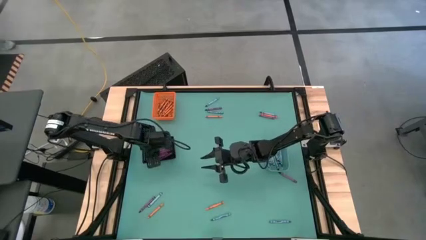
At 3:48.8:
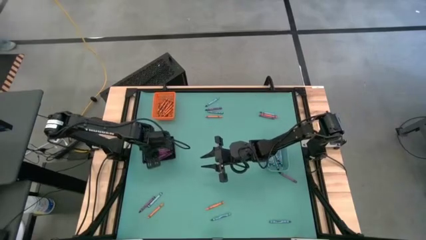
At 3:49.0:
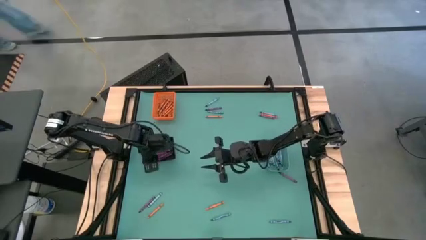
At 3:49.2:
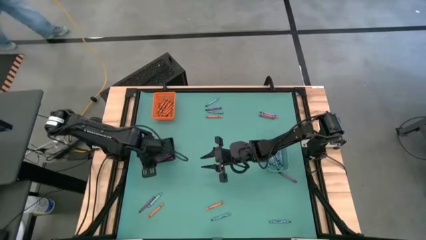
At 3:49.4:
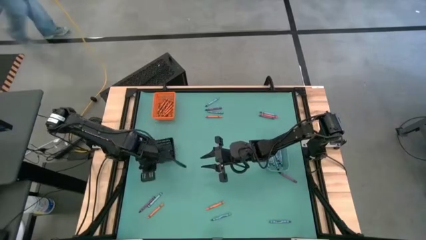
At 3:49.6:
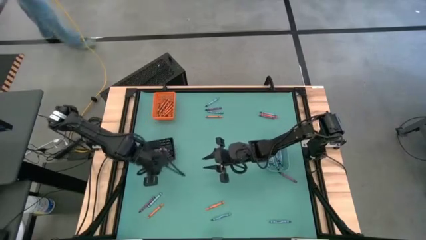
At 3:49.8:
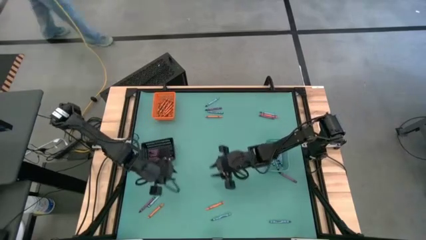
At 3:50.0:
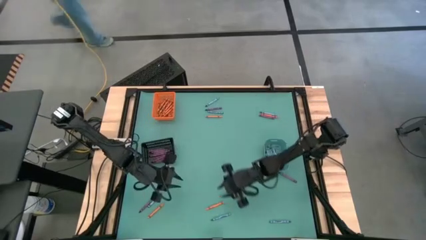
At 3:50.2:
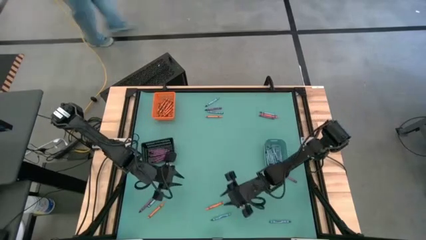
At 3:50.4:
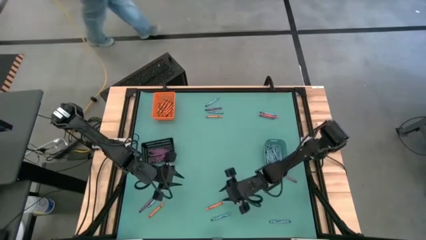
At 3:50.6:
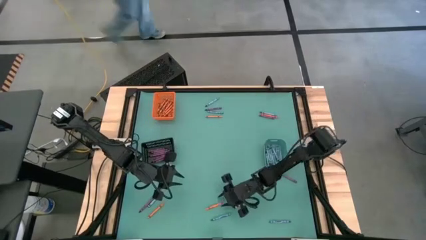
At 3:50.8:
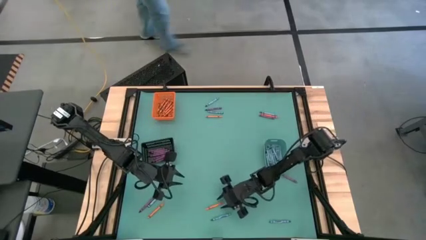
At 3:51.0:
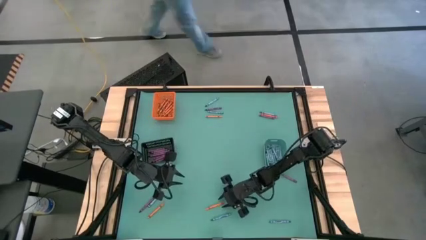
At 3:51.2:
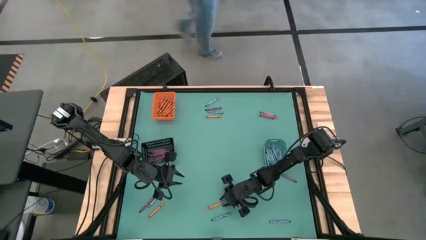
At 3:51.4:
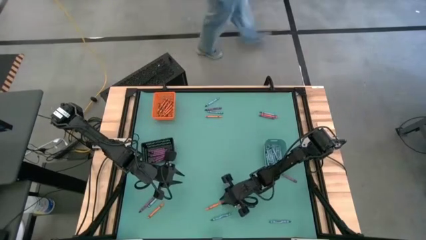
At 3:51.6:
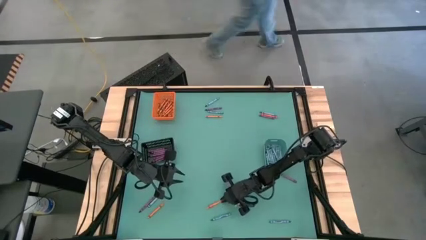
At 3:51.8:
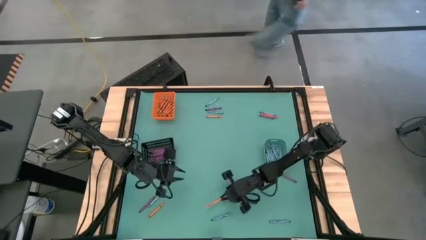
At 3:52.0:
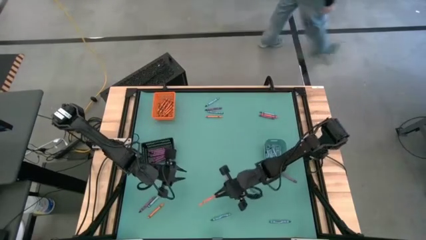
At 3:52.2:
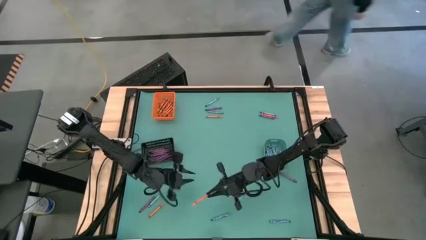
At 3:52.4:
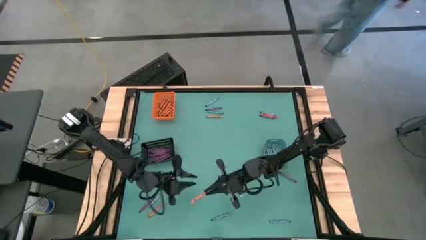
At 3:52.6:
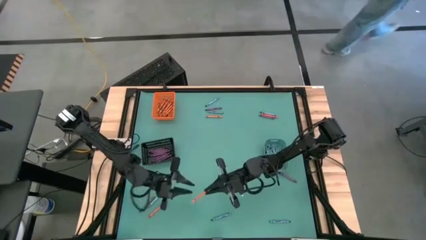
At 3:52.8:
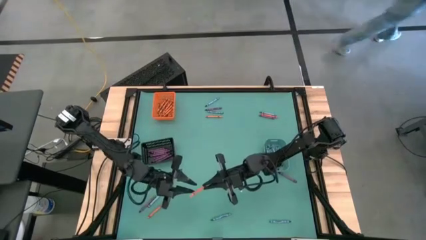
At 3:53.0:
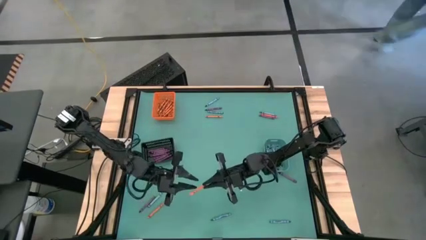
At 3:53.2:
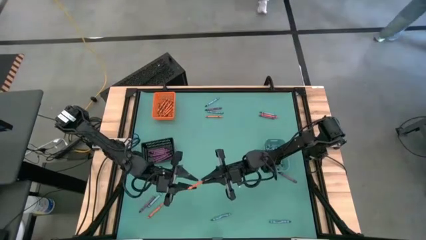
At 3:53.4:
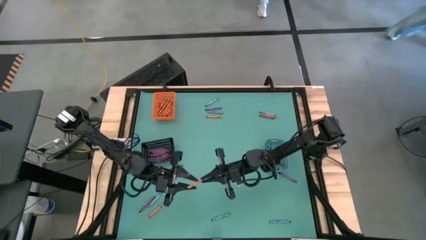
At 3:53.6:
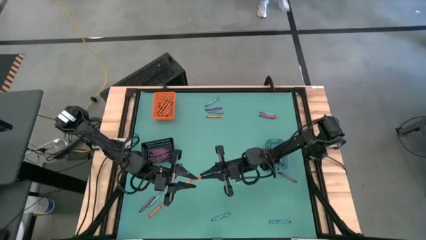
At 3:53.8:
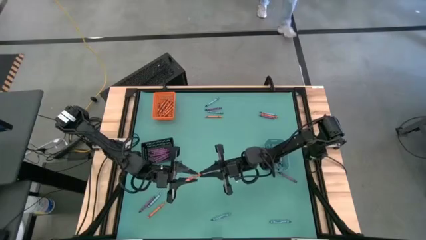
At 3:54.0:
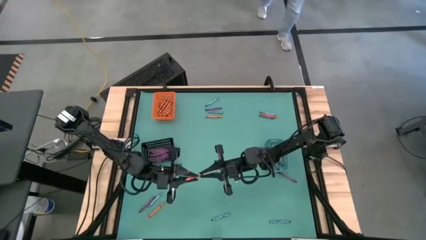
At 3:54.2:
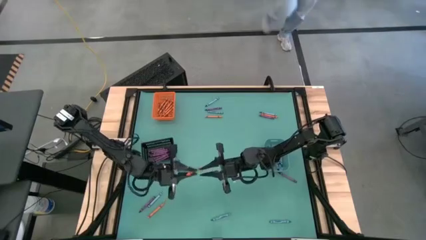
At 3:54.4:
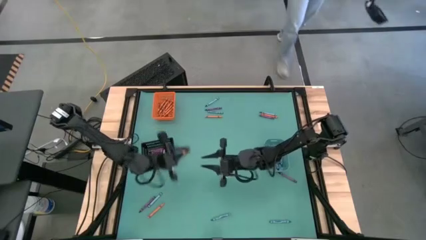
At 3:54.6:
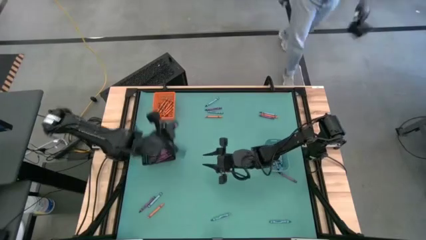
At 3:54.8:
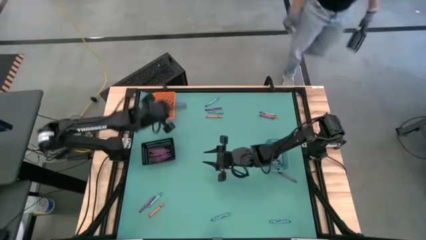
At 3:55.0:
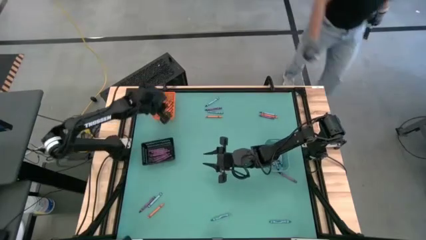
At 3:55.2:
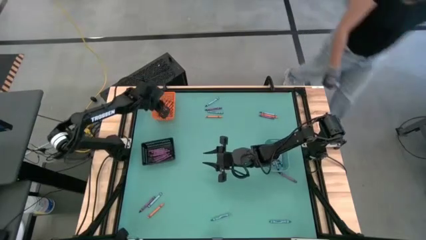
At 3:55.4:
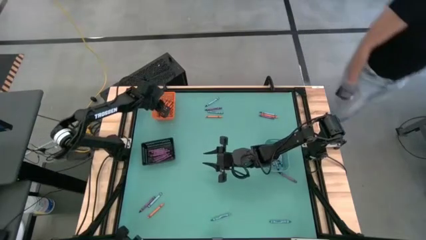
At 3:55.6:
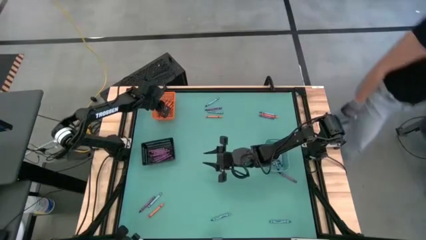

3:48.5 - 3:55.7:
Task: Sort crayons
Put the orange crayon into the orange bin

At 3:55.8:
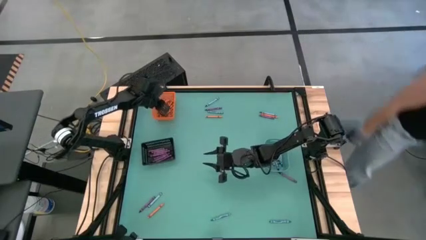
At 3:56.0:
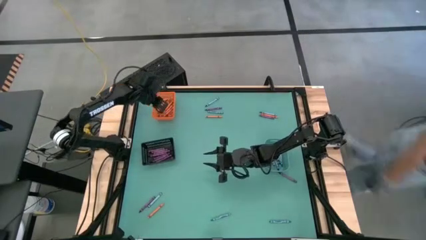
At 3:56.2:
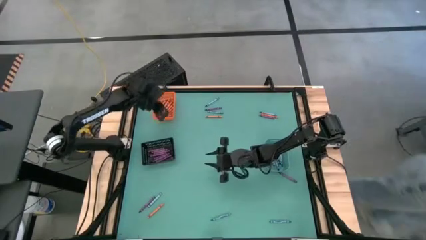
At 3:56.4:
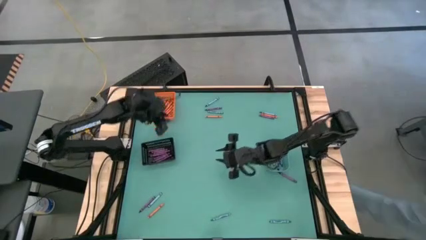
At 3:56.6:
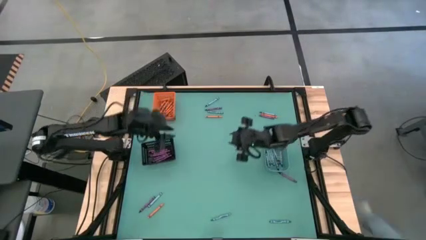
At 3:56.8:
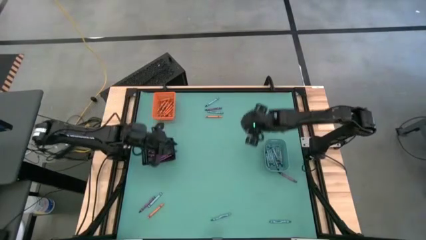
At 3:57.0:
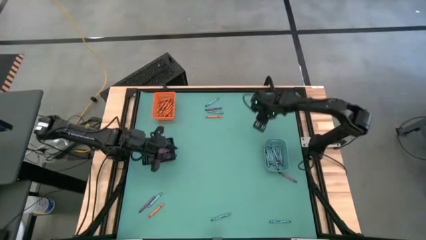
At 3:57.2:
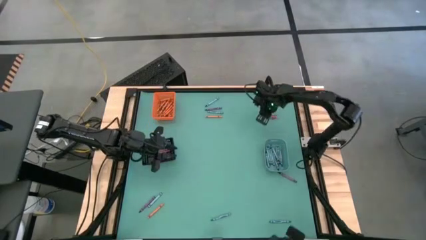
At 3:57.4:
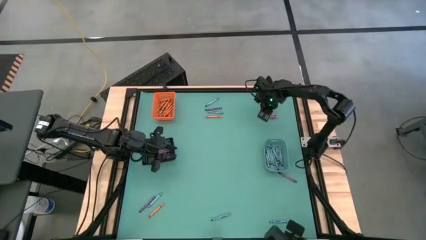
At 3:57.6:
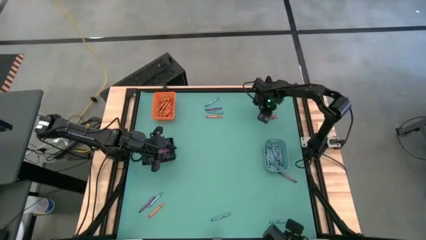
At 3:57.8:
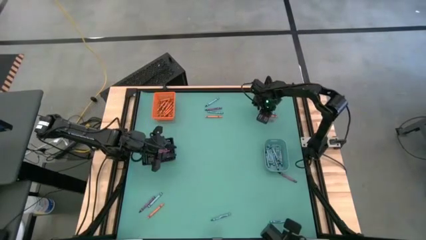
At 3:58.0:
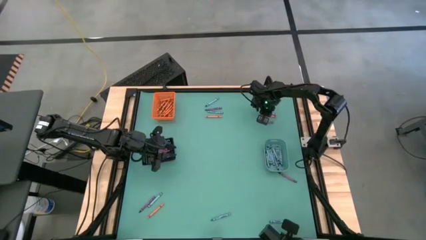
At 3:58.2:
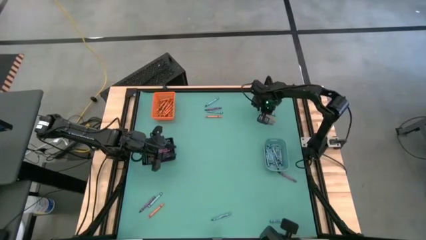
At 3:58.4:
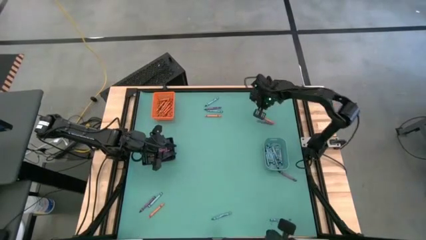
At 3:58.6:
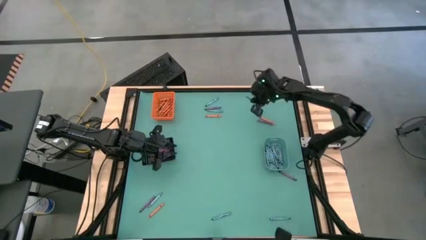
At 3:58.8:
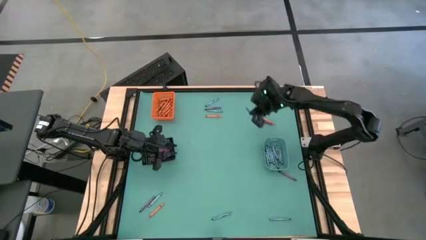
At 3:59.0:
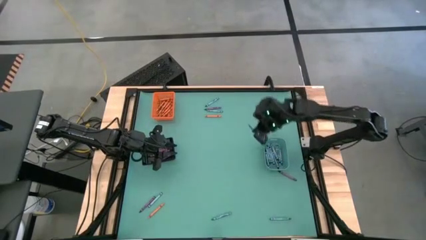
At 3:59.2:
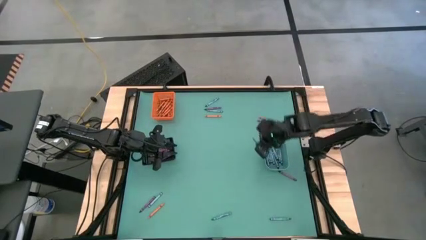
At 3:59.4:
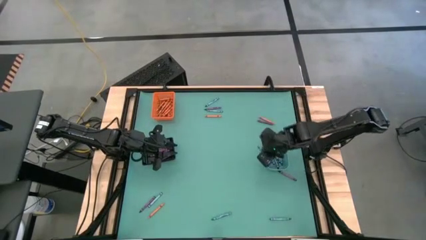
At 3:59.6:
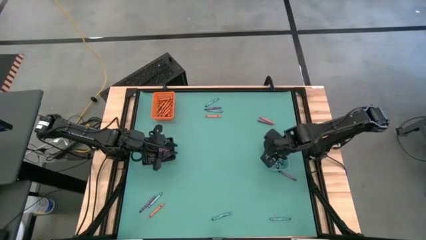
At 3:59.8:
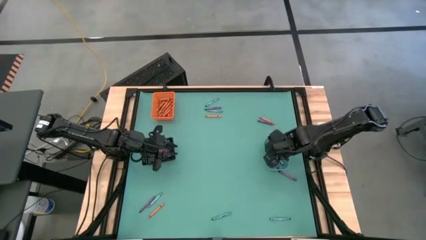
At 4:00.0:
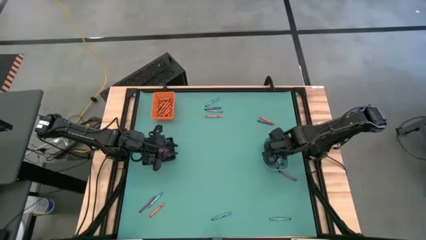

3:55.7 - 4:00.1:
Put the light blue crayon into the blue bin

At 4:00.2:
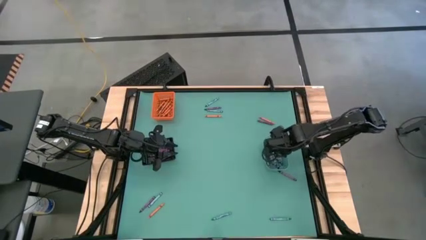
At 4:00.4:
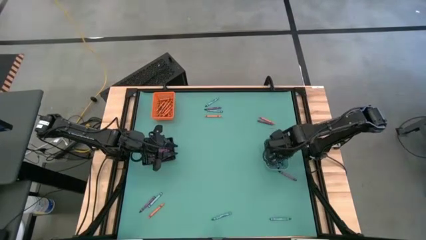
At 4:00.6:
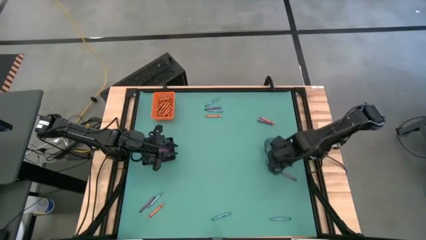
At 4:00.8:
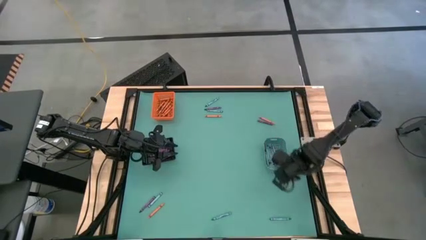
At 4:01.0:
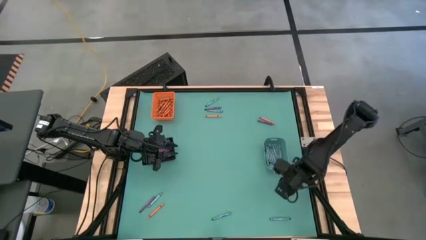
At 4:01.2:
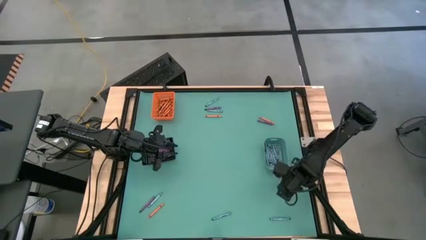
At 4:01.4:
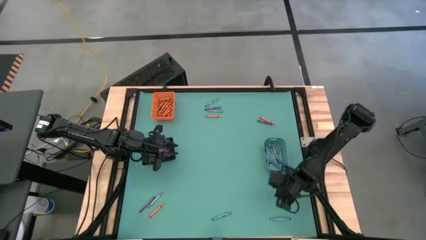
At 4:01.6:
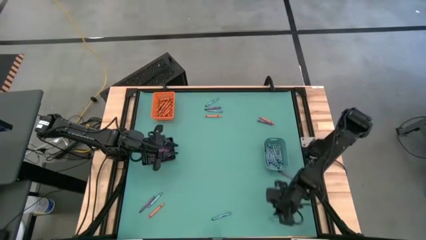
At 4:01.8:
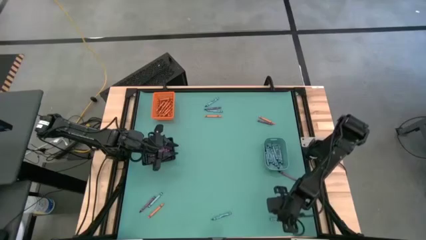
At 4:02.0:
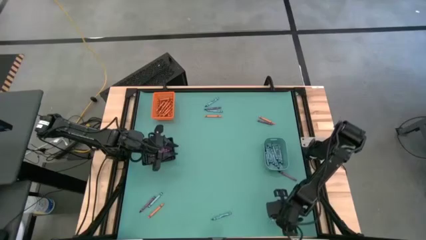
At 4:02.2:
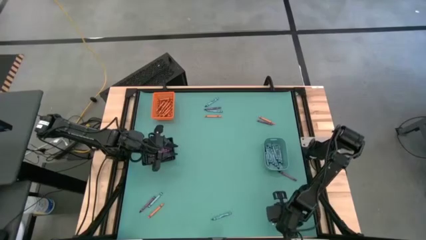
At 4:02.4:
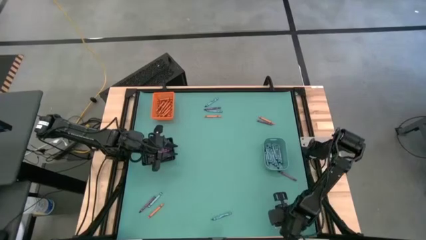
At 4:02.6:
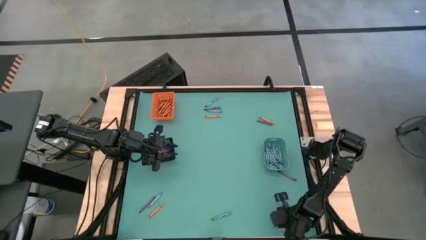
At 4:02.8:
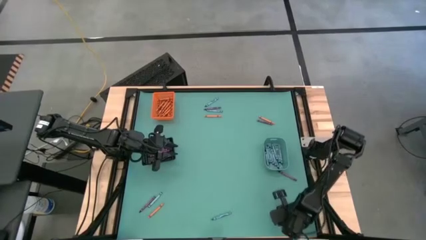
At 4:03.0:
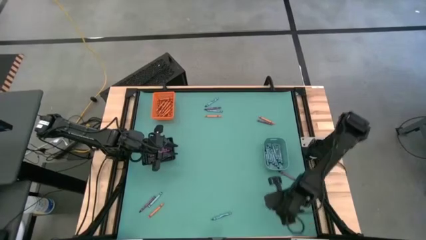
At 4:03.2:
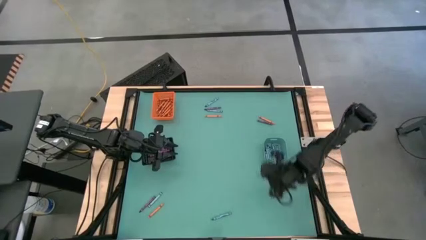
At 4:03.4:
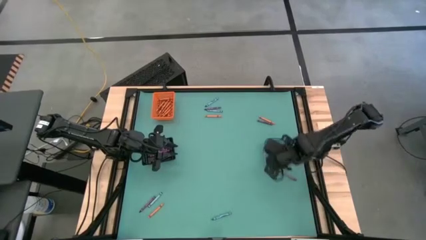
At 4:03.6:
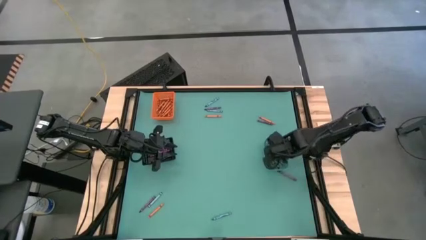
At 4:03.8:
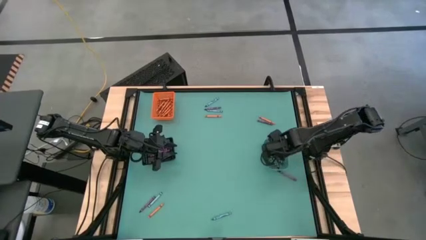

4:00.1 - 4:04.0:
Put the light blue crayon into the blue bin

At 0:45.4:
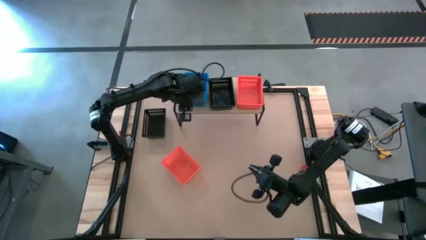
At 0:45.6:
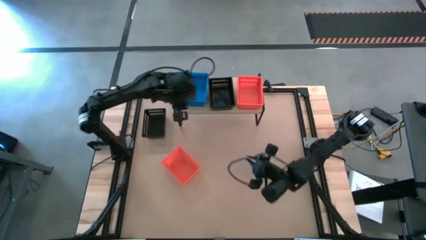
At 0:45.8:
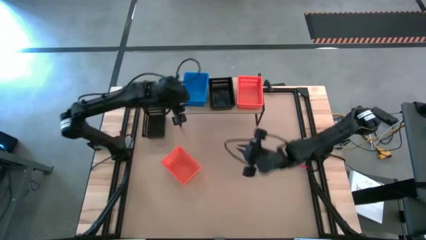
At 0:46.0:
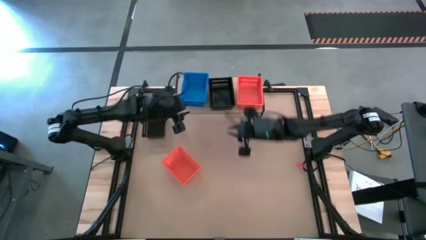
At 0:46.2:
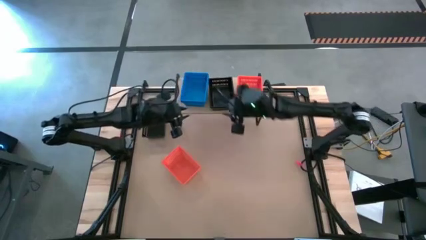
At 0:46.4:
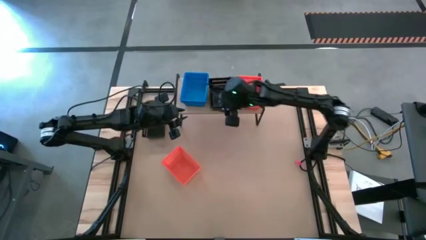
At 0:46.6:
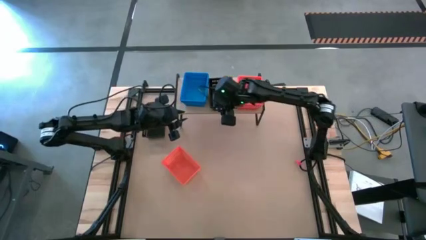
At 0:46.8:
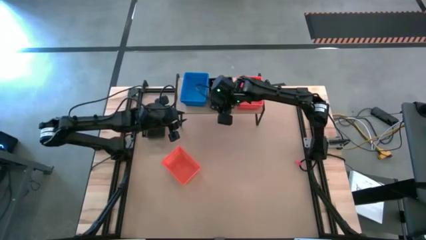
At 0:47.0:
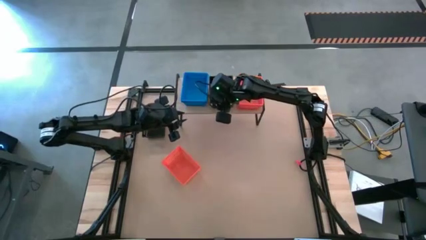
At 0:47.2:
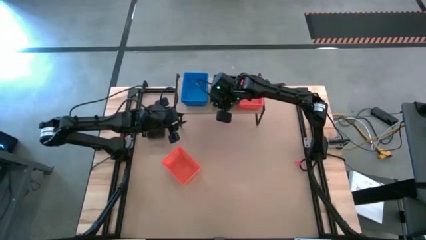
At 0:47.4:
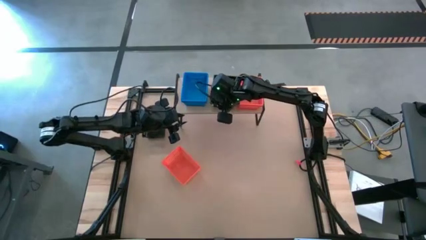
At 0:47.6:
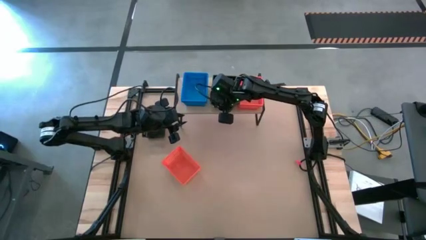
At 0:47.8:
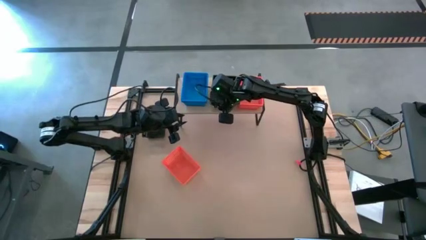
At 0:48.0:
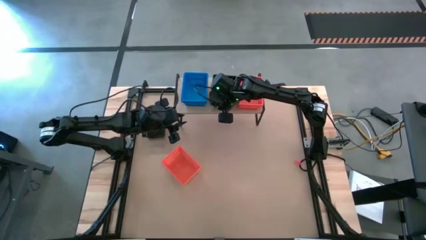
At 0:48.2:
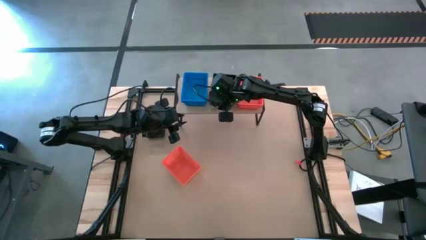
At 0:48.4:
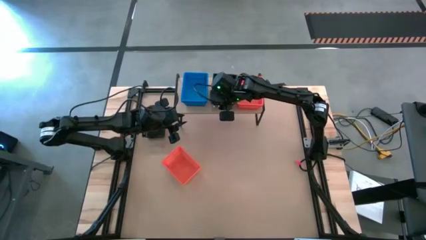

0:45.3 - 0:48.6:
Task: Stack baskets on shelf by color
Adjust the stacked black bins on the shelf
